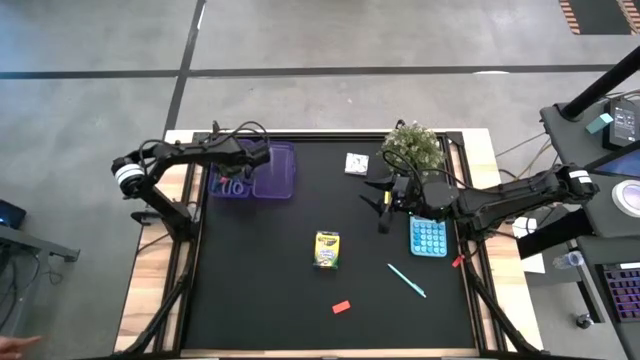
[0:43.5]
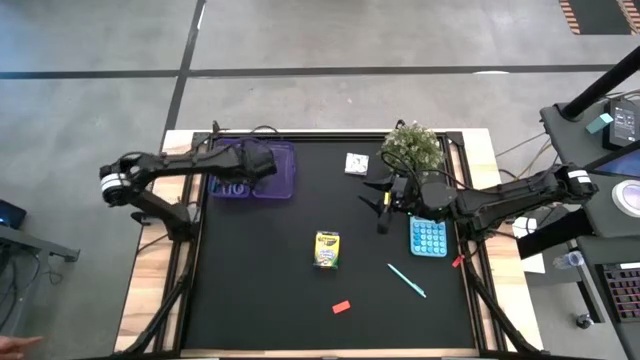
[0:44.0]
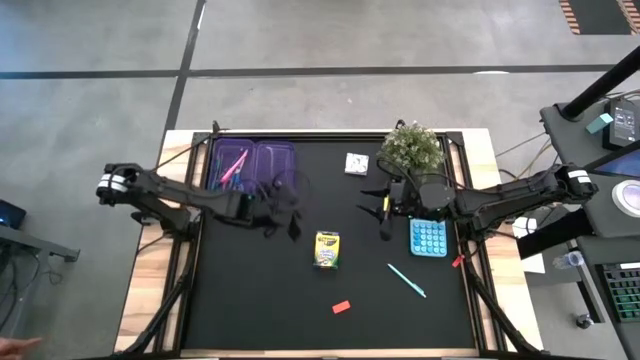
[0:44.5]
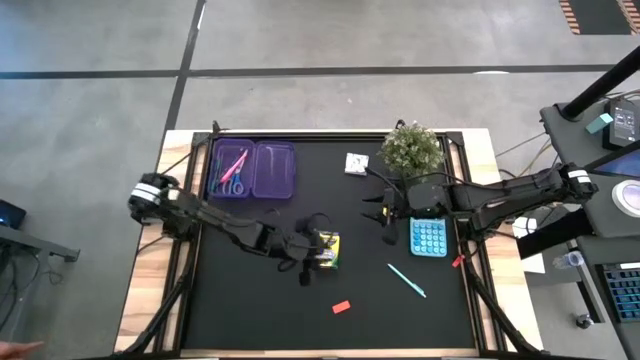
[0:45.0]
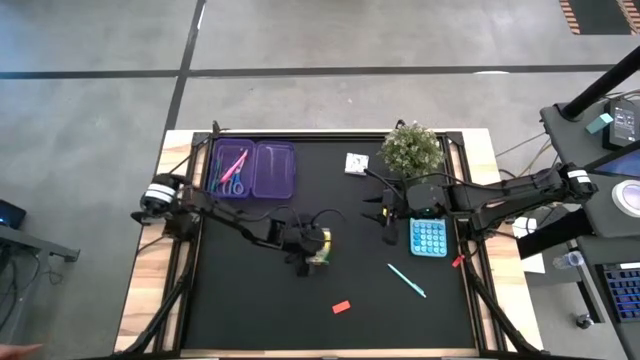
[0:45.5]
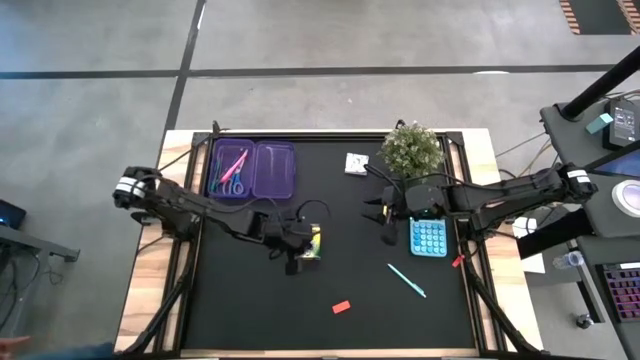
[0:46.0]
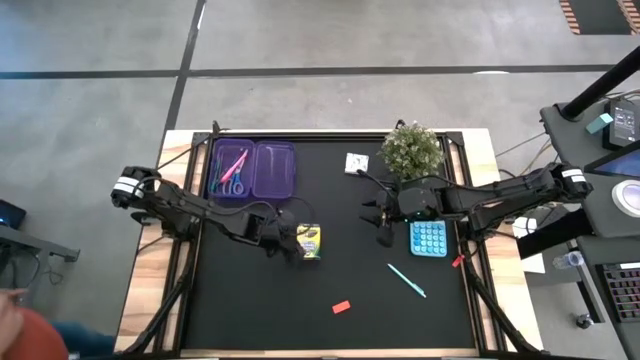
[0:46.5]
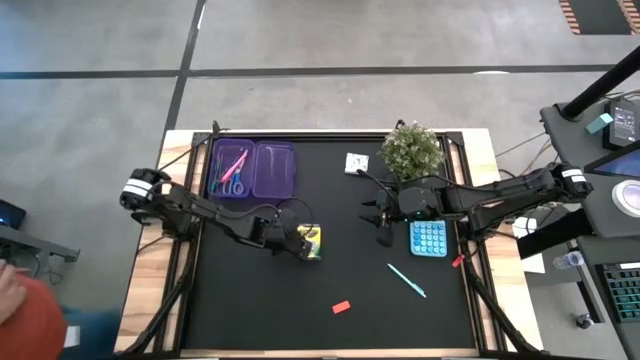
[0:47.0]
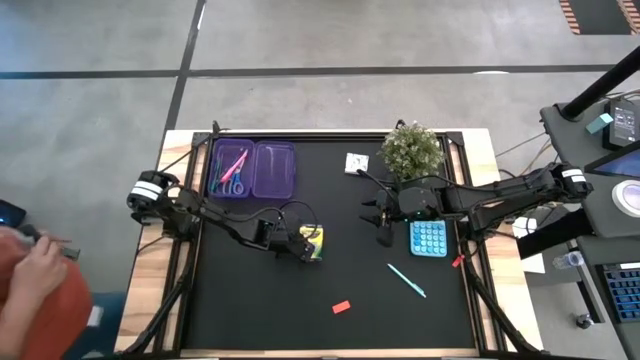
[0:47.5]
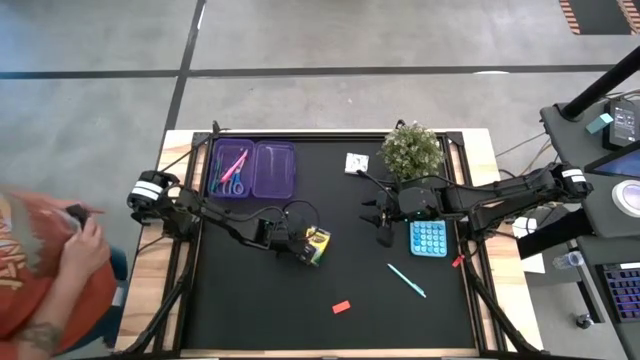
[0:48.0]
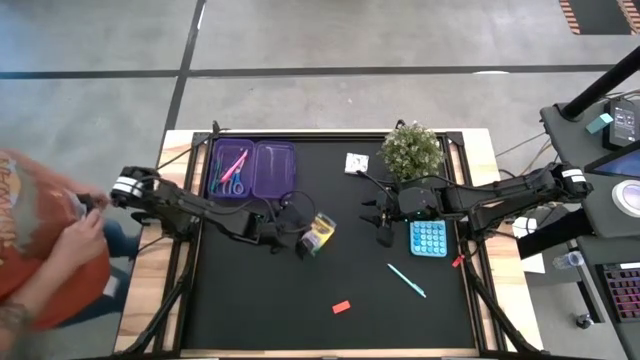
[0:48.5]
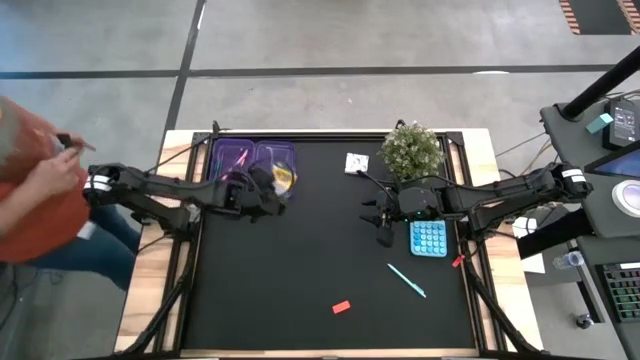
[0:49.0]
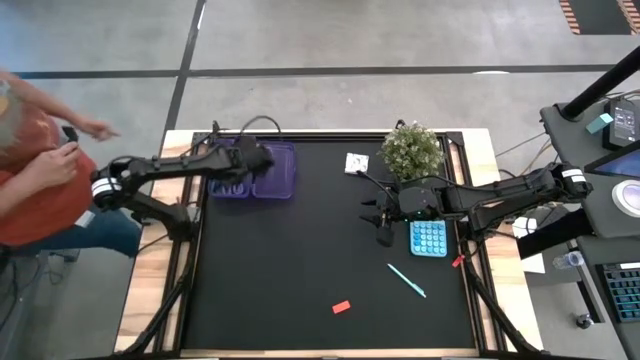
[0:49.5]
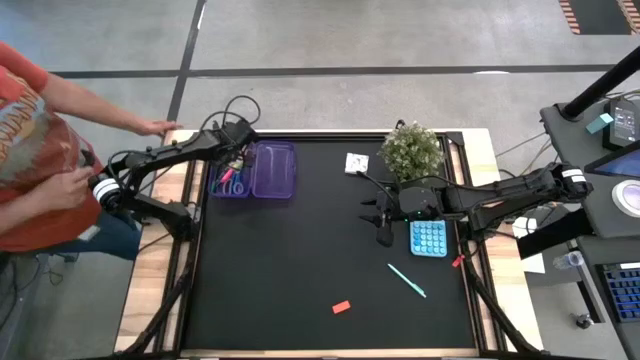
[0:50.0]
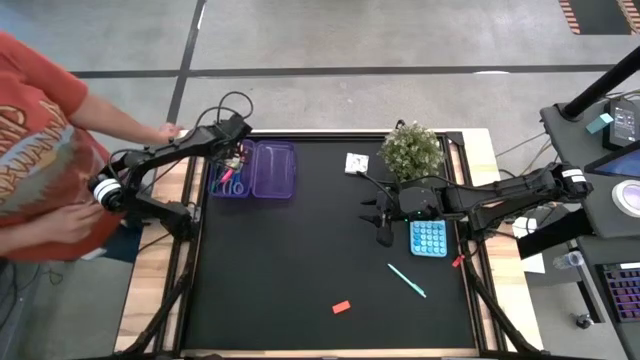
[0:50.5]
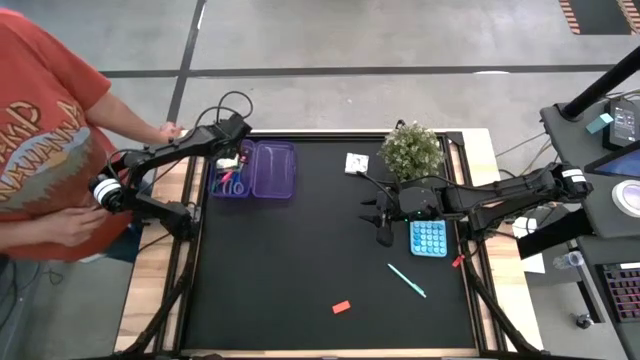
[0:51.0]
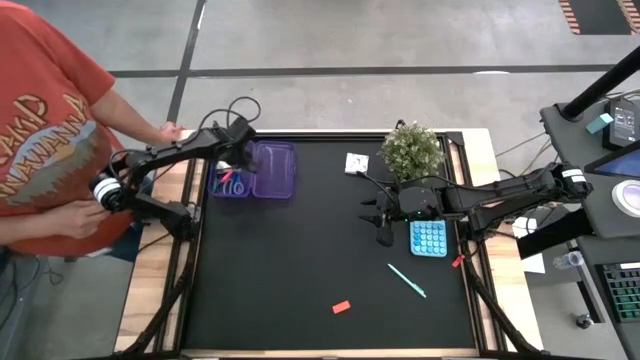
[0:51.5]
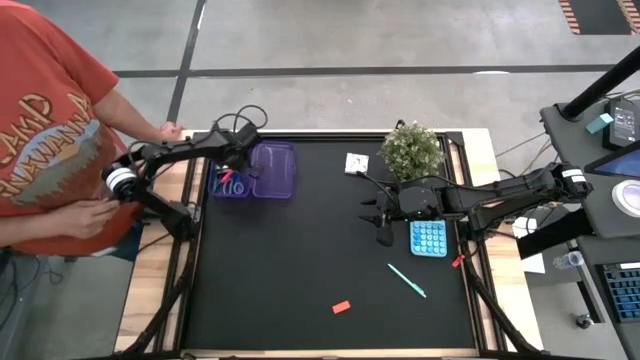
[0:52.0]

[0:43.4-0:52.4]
Task: Pack school essentials
Put the yellow crayon box into the purple supply box

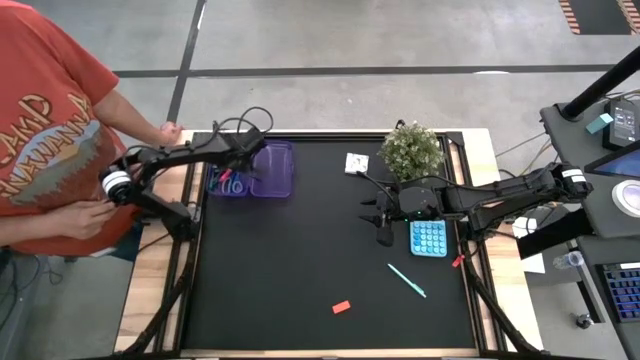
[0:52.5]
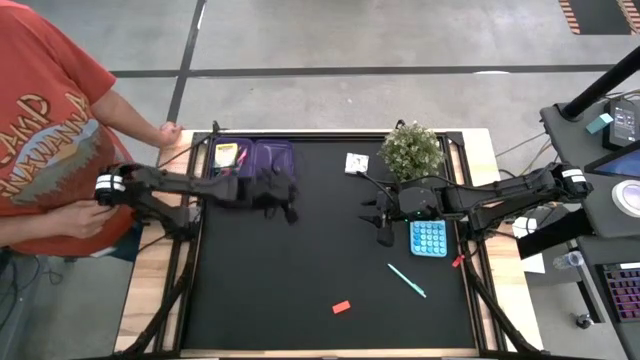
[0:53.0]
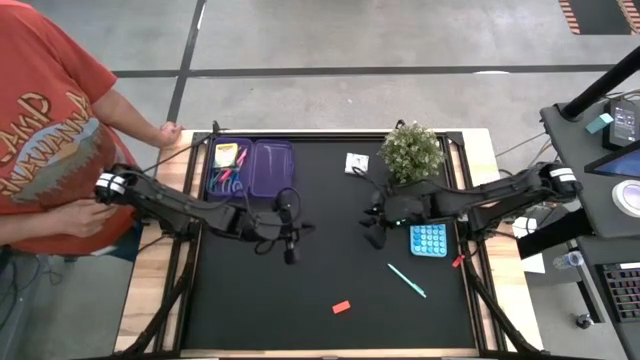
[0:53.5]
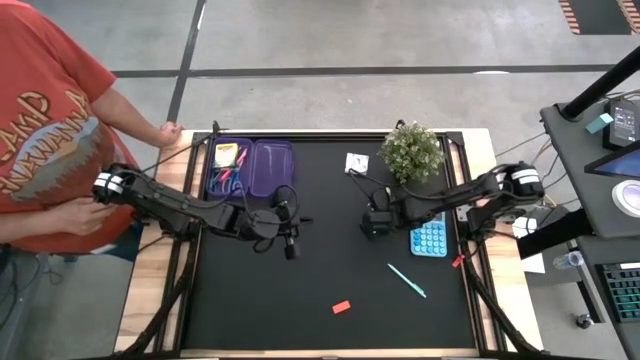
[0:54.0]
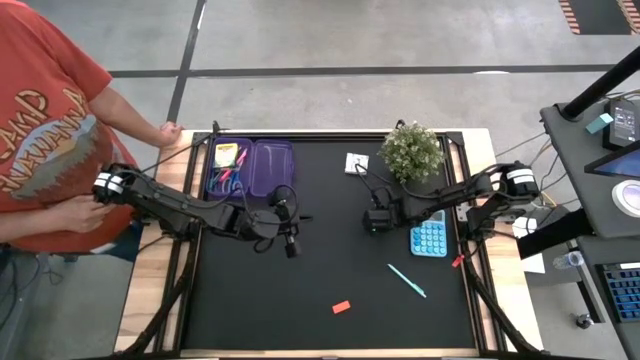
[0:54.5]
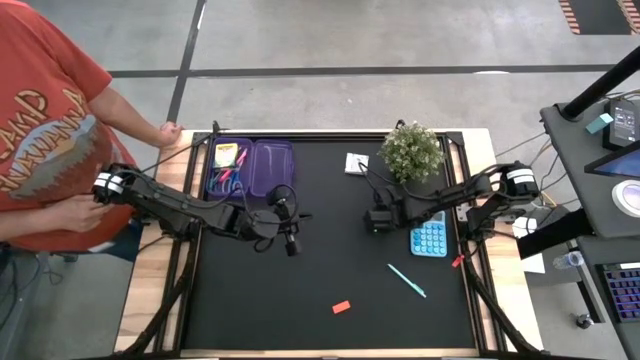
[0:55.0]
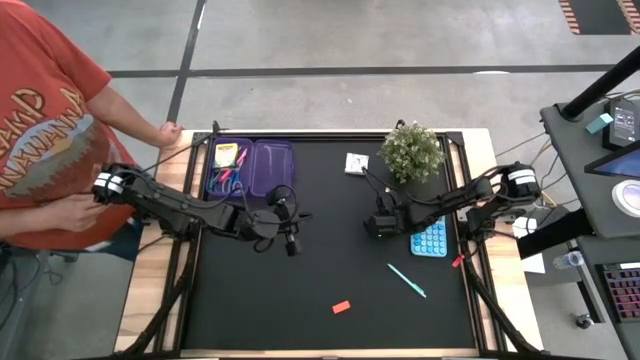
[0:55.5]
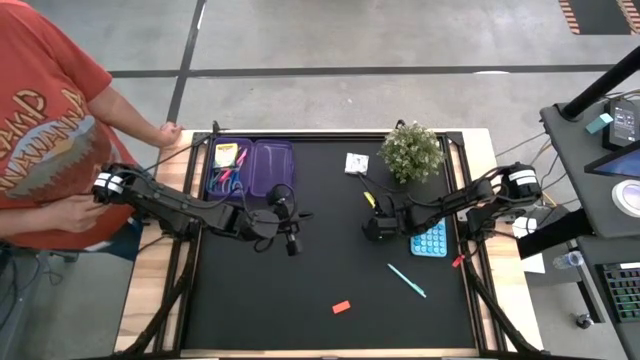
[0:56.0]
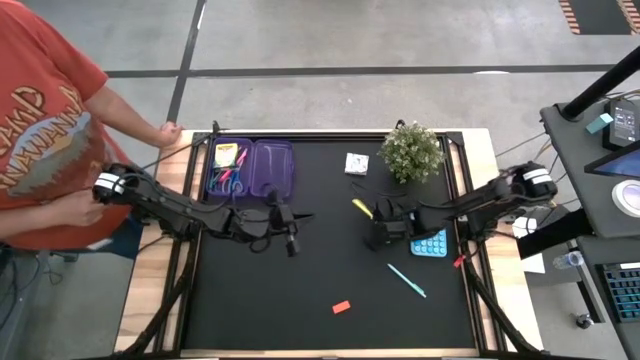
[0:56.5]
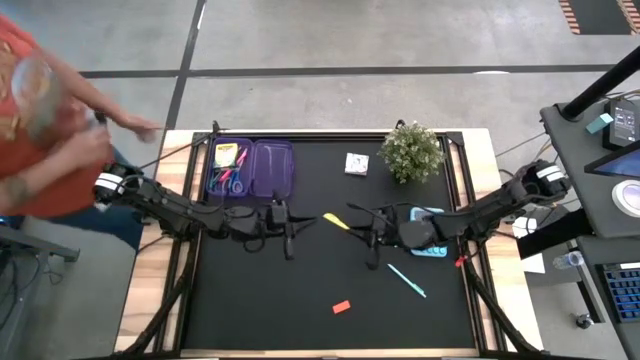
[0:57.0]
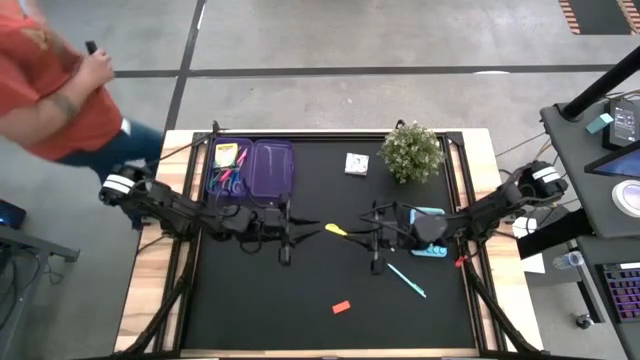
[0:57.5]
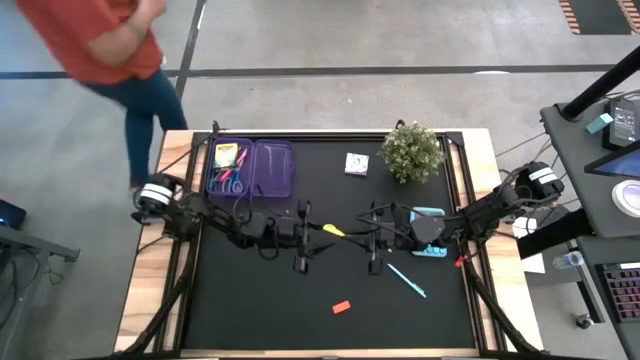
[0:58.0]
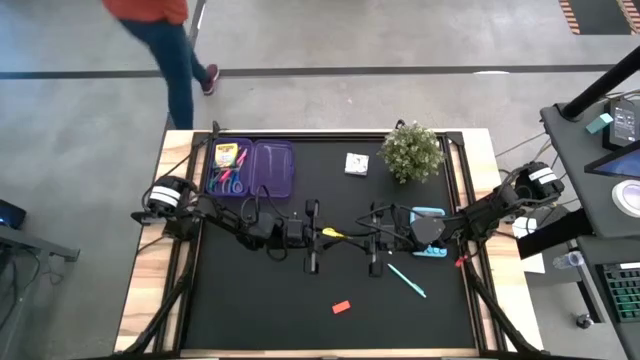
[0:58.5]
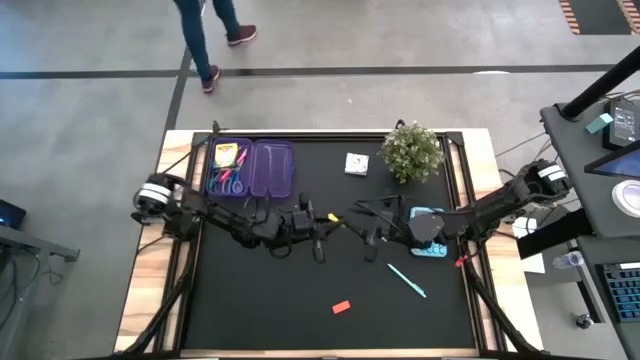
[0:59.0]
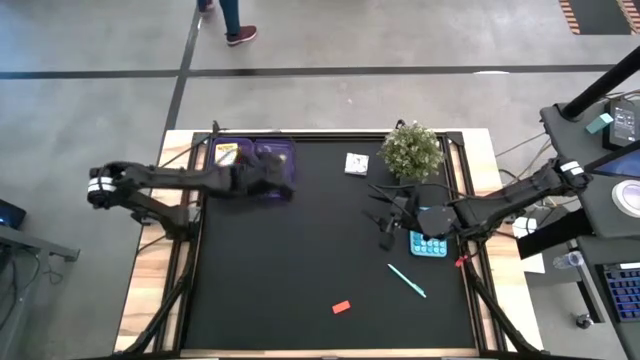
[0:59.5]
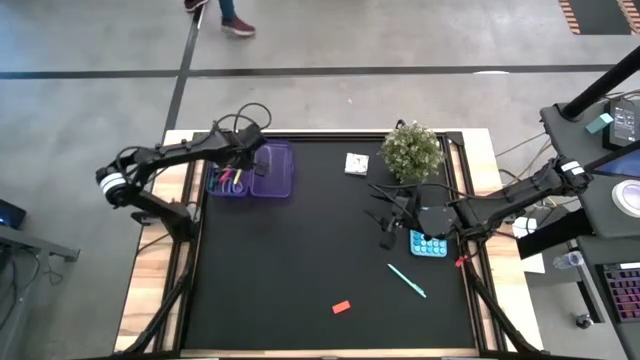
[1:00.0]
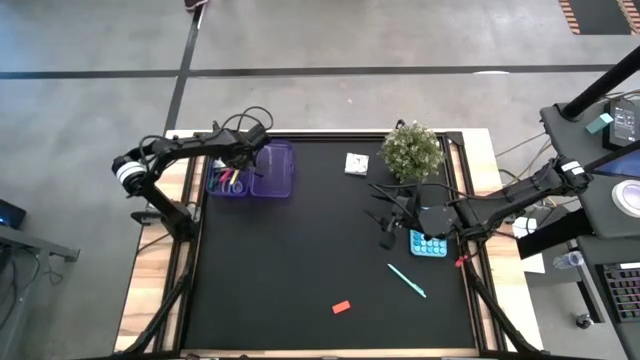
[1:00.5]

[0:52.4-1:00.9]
Put the yellow pen into the purple supply box

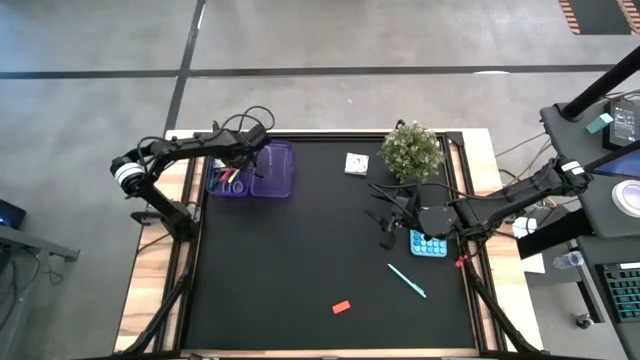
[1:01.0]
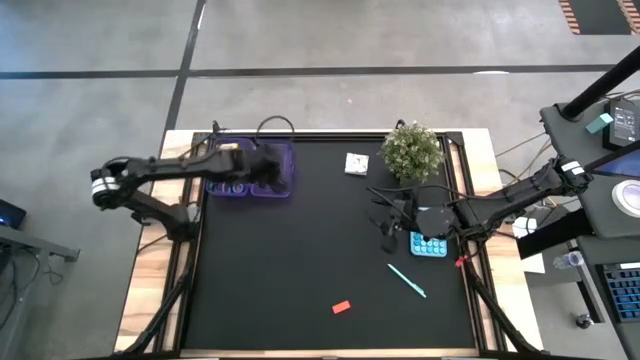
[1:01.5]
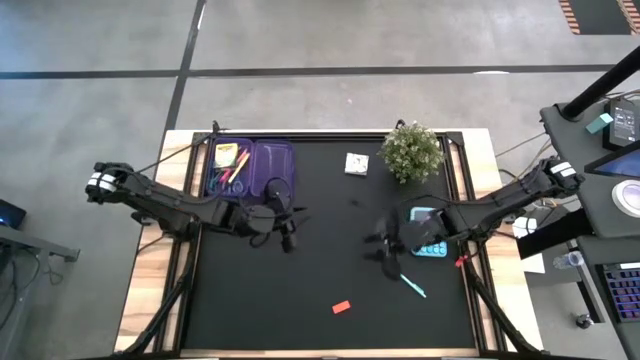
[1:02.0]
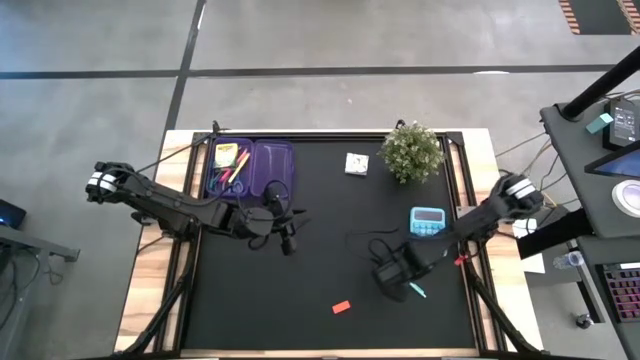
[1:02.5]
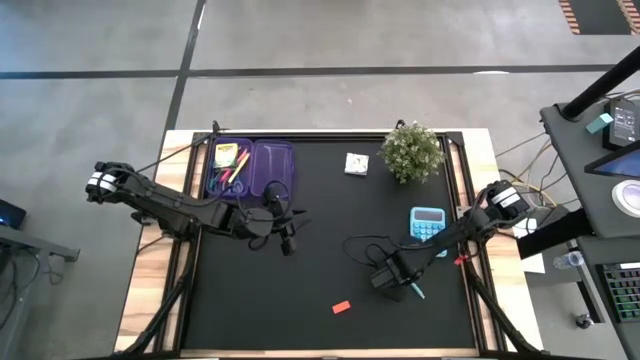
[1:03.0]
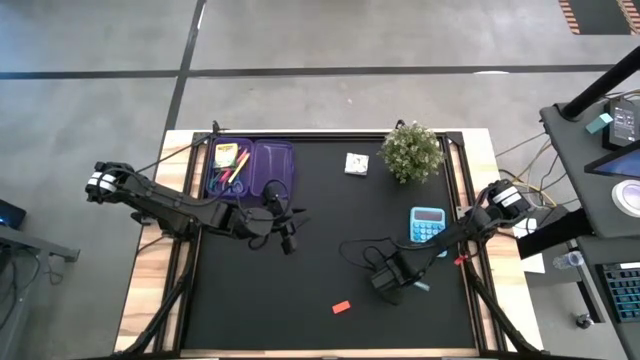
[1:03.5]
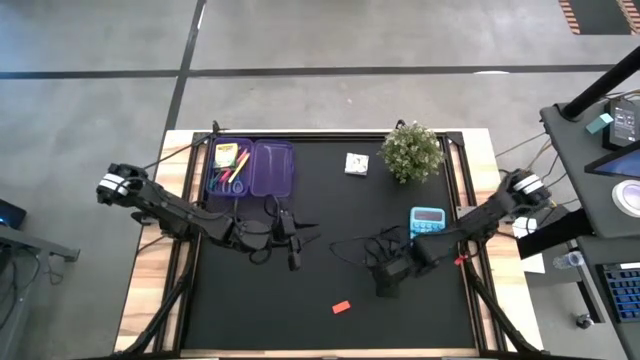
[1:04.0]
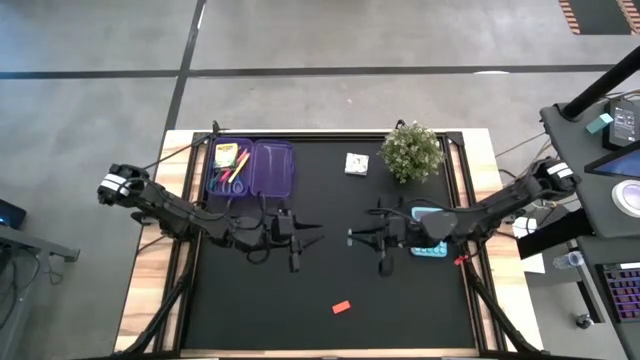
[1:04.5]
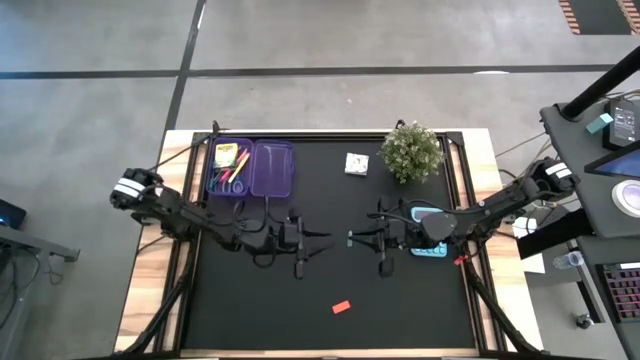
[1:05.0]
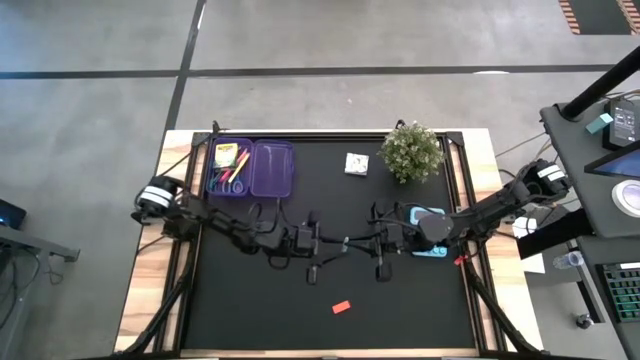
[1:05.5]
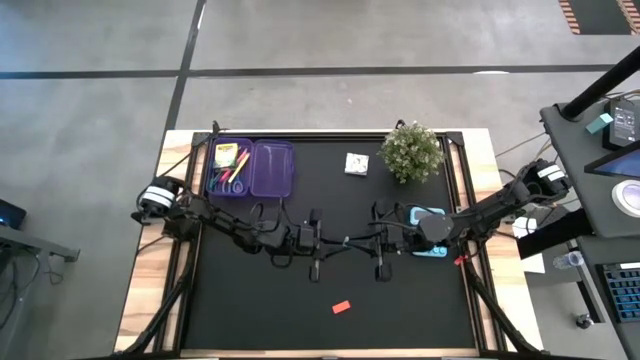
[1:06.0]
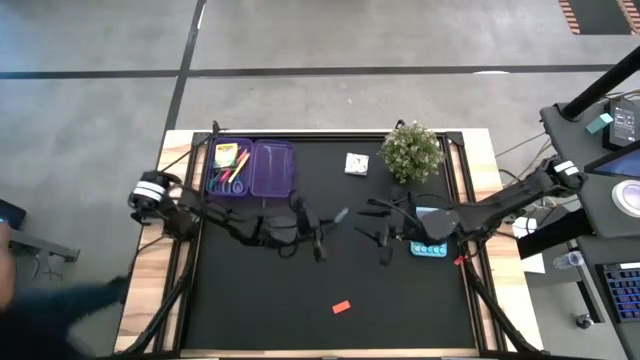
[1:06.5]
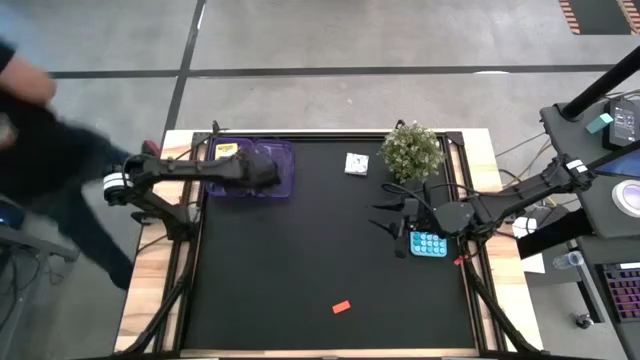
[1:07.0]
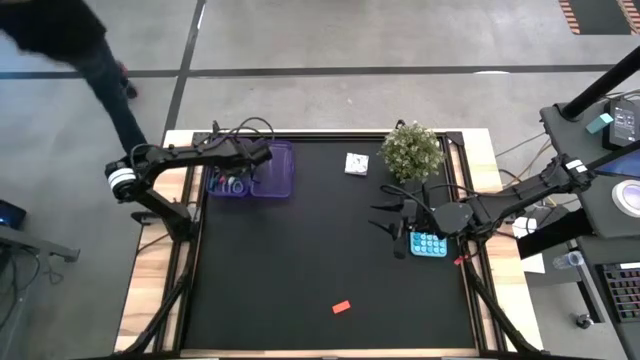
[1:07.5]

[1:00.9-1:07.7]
Put the light blue pen into the purple supply box
